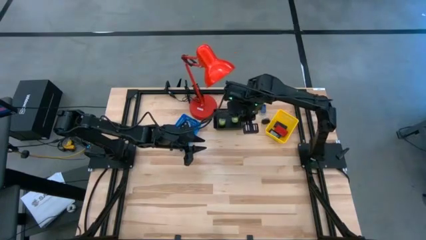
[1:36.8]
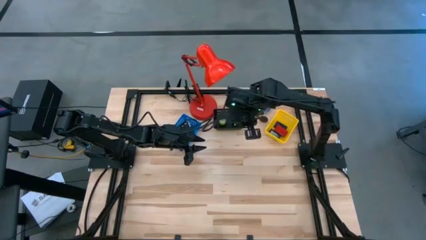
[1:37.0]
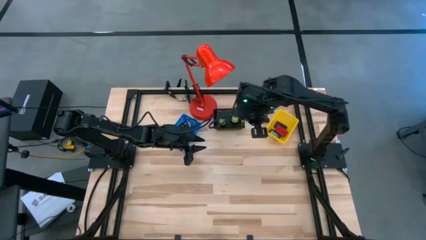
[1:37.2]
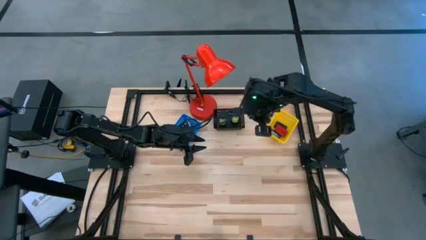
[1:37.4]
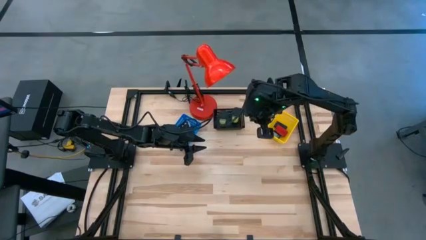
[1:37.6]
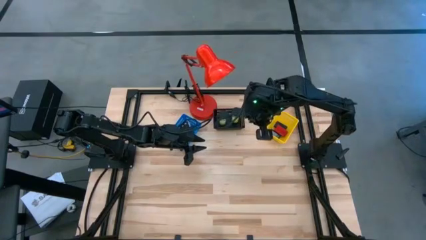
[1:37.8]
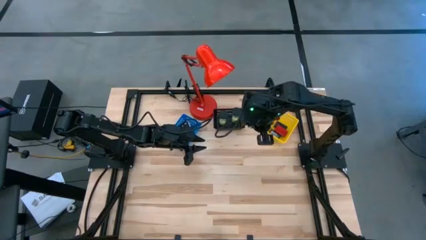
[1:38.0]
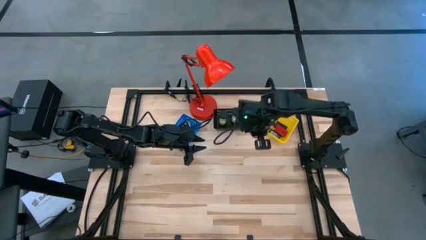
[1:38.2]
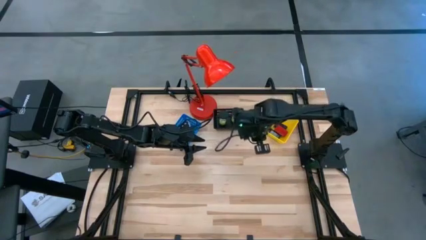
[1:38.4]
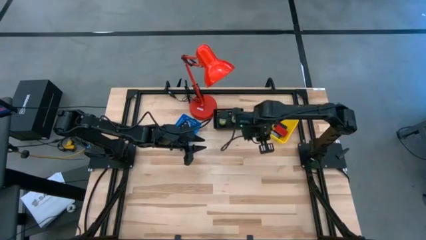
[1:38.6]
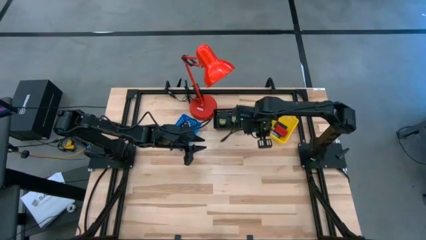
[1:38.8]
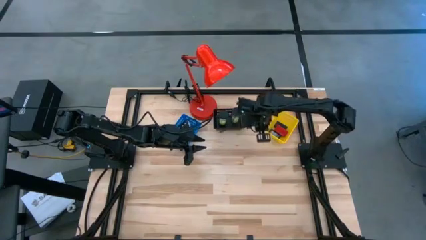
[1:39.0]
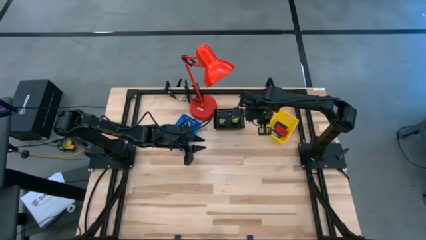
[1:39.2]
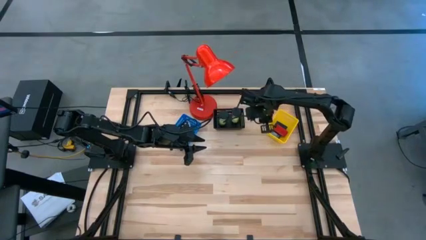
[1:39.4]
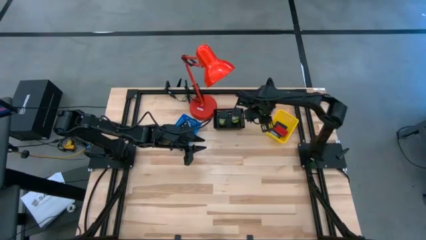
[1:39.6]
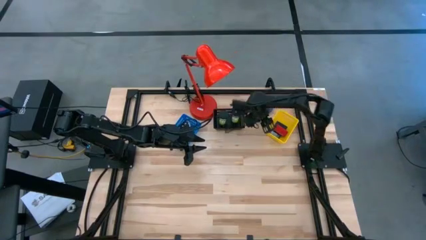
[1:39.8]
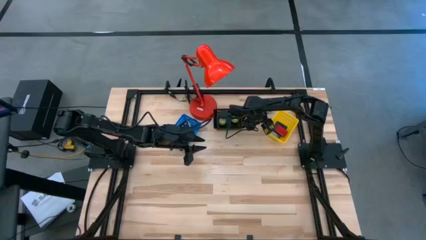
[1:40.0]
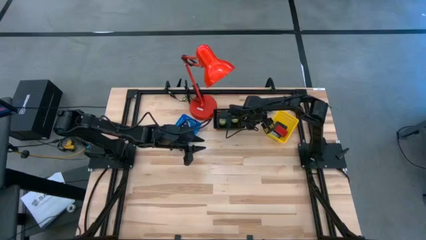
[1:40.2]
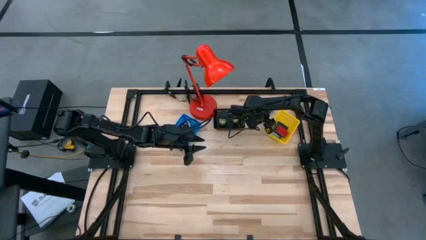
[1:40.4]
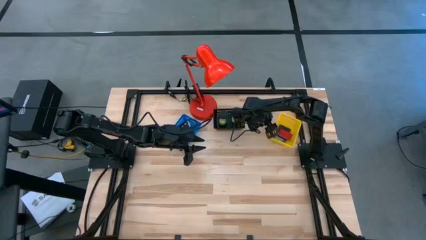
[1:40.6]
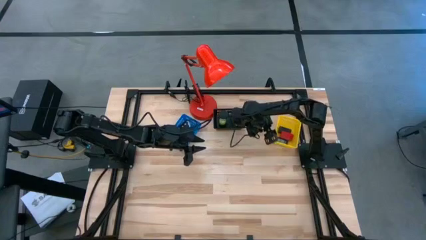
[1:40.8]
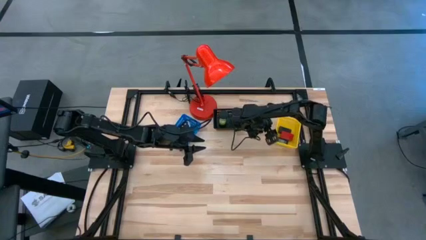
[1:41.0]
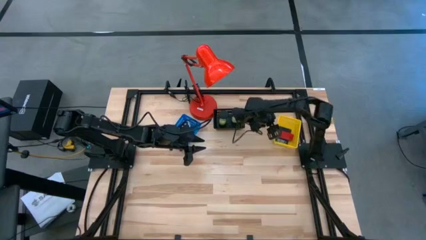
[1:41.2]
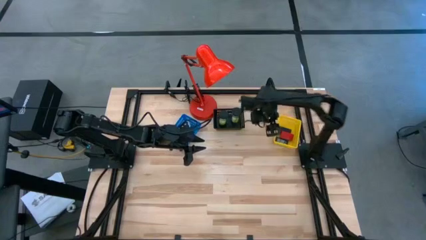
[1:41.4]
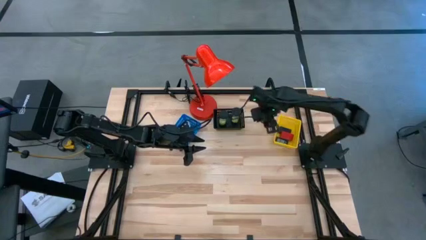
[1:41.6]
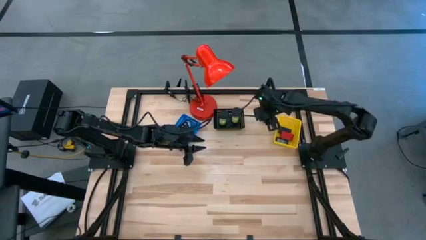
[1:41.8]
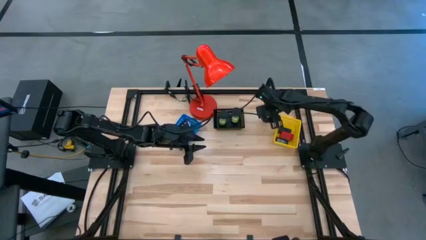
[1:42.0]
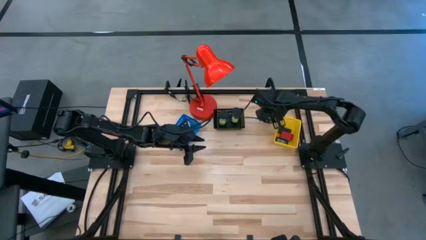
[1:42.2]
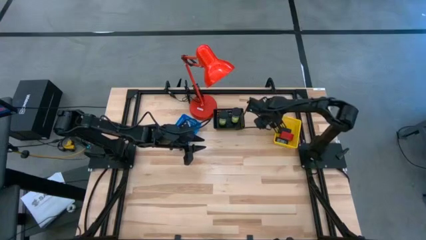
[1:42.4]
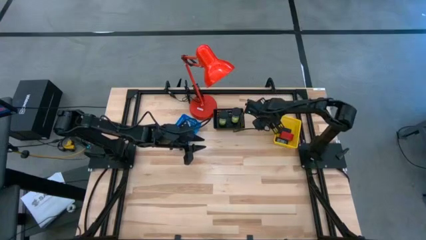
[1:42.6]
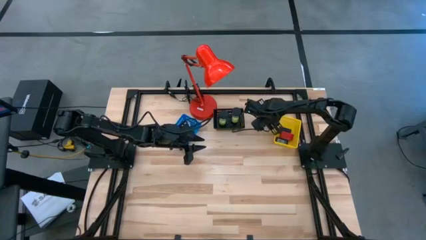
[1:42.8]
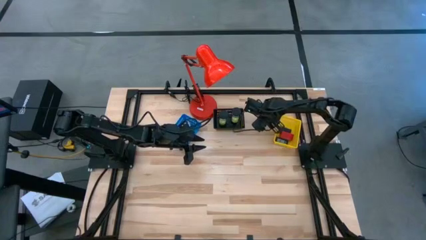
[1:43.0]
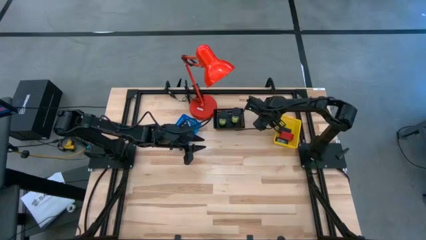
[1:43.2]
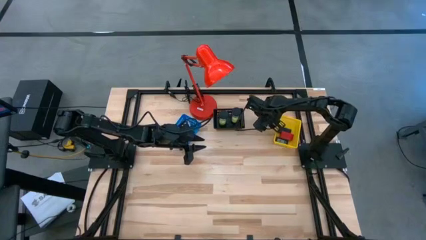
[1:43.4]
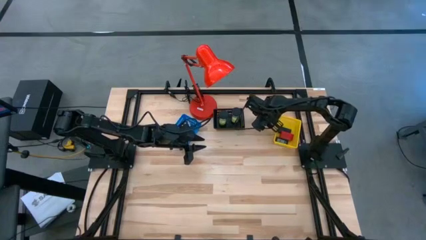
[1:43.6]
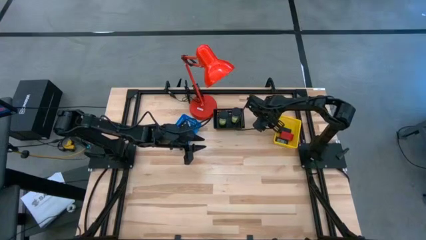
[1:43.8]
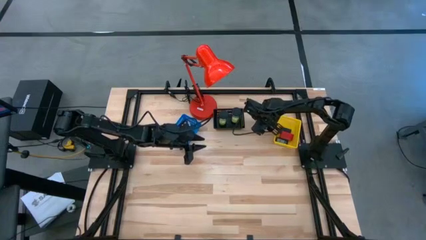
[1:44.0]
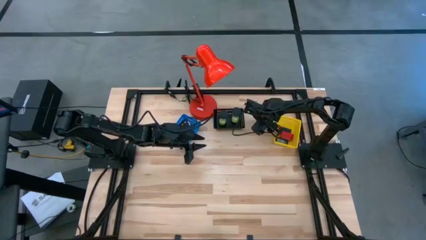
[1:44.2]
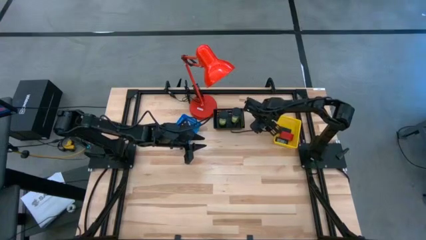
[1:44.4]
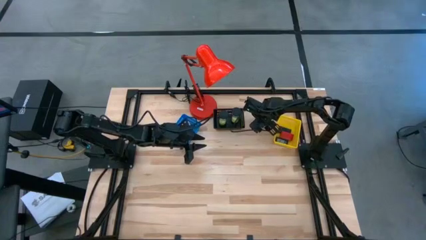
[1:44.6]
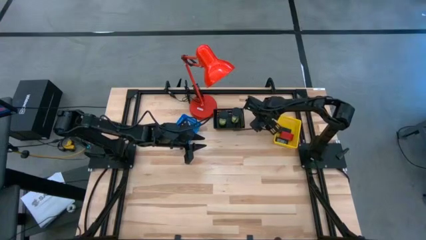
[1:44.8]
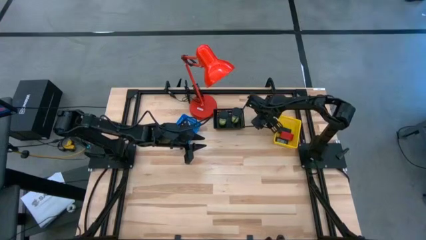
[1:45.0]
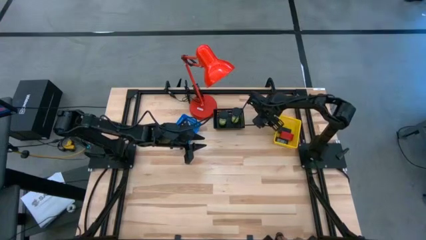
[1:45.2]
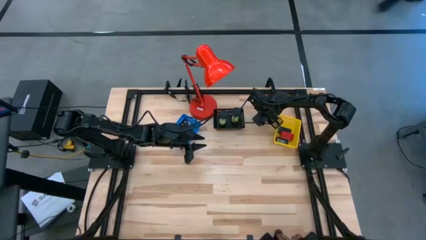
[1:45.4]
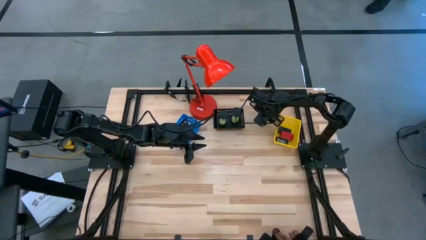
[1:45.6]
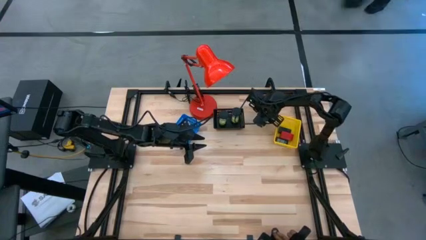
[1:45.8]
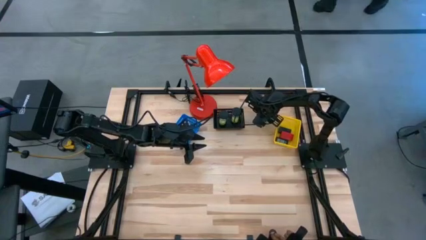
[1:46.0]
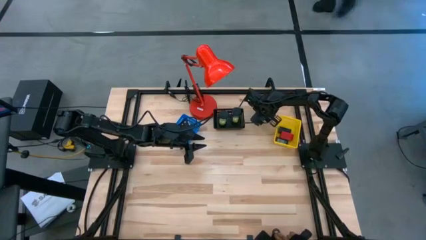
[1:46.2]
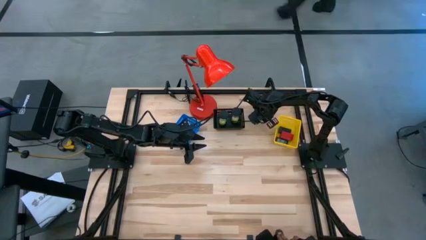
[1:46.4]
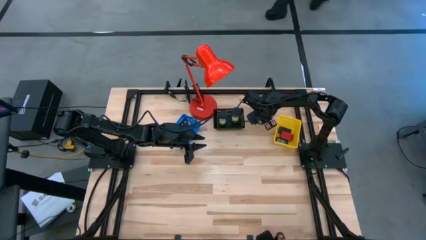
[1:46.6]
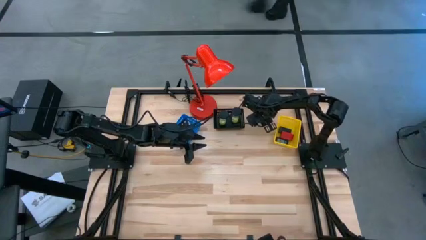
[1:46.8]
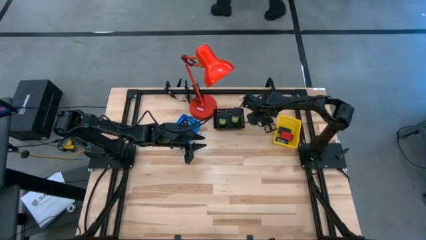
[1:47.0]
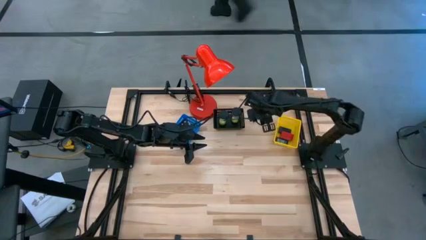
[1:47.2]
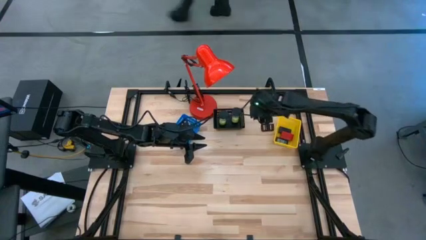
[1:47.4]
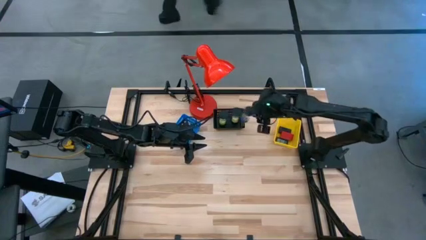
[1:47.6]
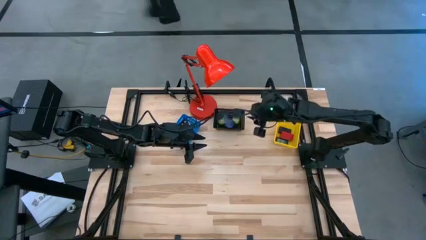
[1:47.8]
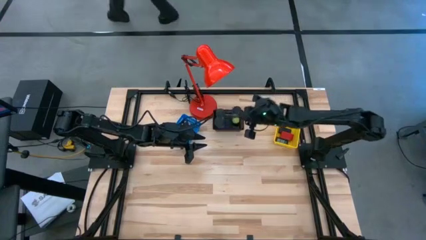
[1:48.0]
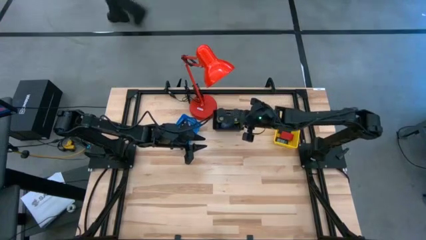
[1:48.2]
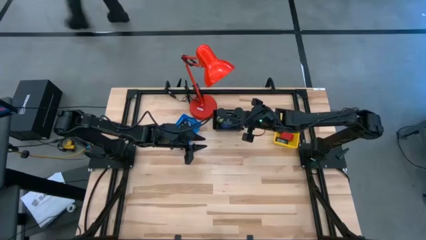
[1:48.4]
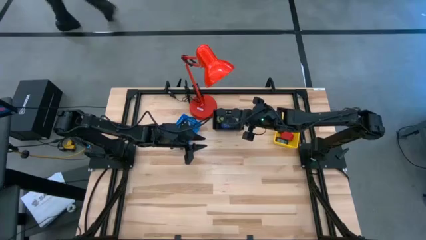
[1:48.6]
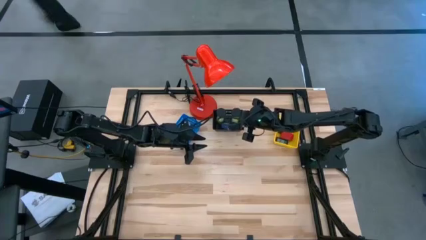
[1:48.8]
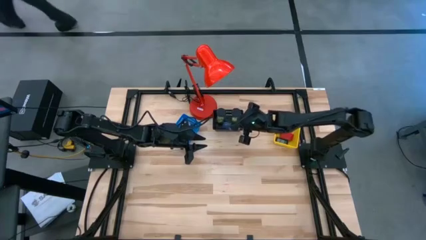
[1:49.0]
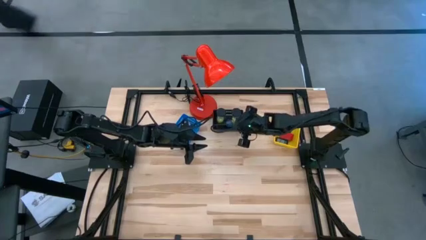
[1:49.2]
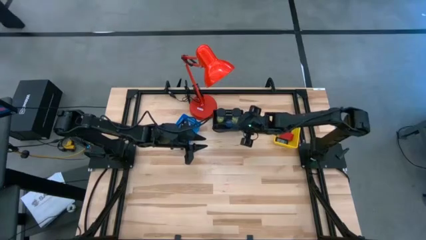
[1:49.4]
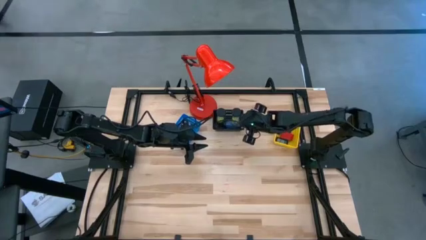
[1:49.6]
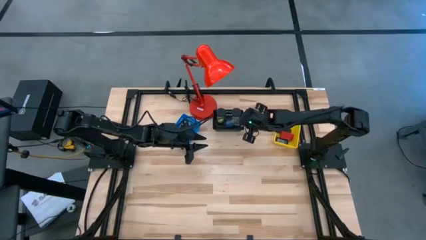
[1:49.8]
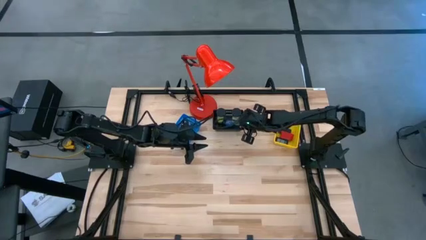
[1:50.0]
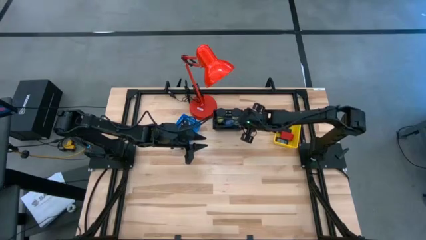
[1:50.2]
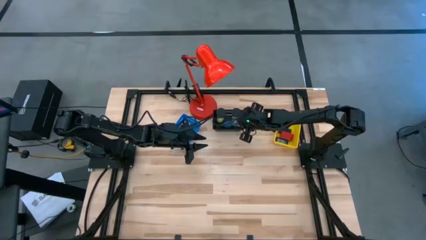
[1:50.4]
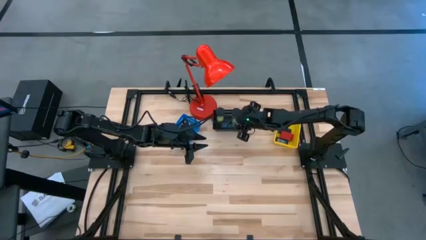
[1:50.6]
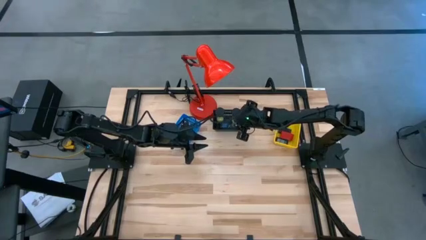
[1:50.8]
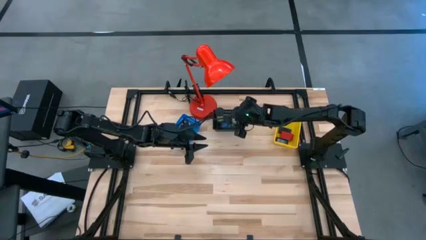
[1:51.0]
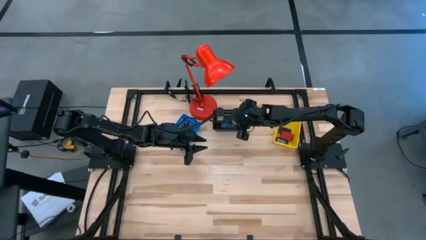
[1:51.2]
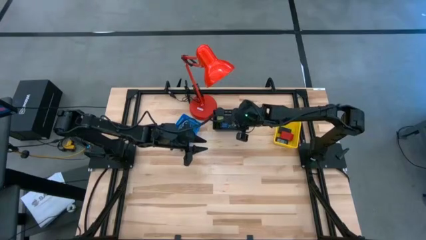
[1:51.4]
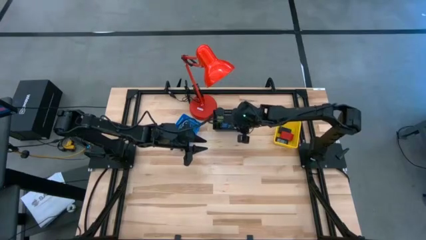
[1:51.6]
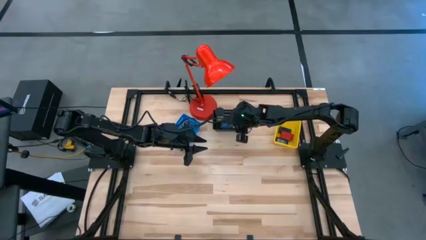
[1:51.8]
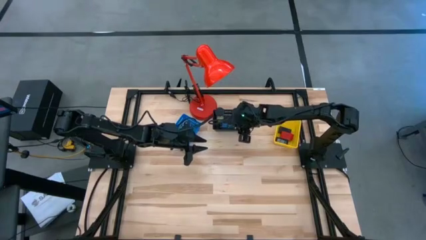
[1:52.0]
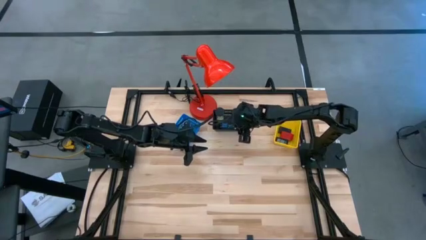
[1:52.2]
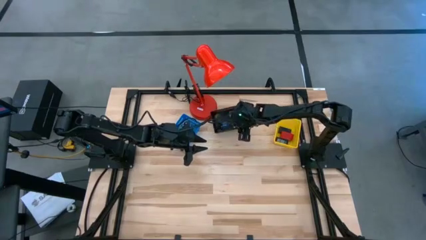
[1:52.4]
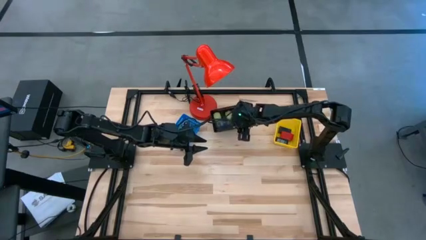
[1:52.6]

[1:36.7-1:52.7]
Task: Pick & Place Office items
Put the blue hourglass into the black bin

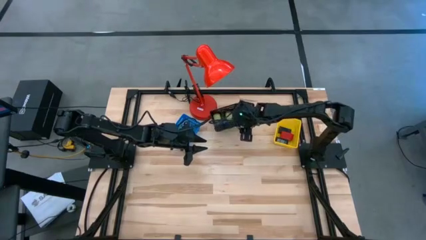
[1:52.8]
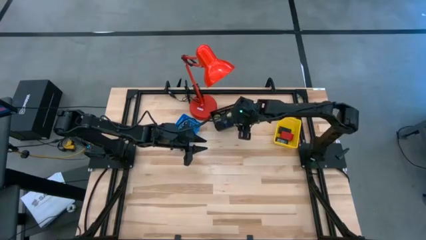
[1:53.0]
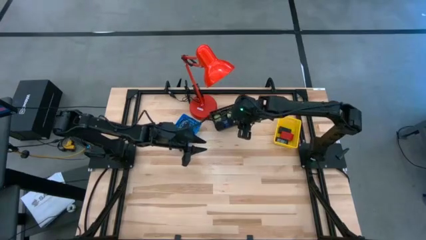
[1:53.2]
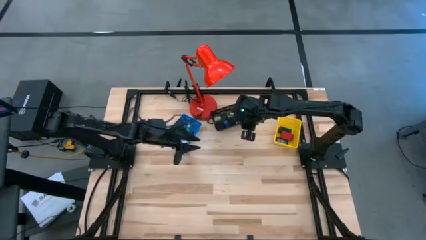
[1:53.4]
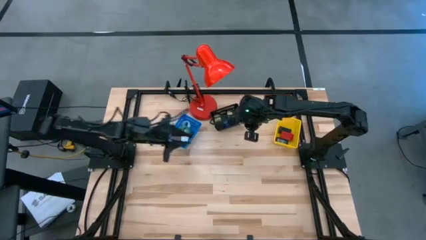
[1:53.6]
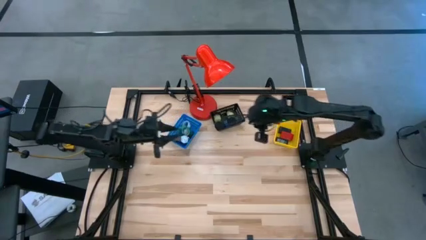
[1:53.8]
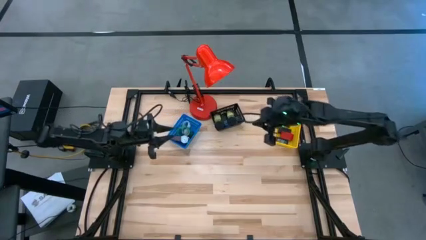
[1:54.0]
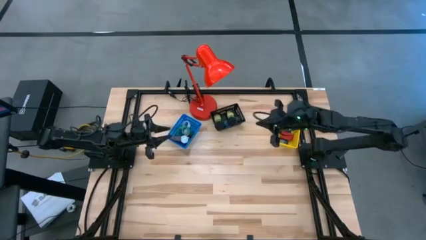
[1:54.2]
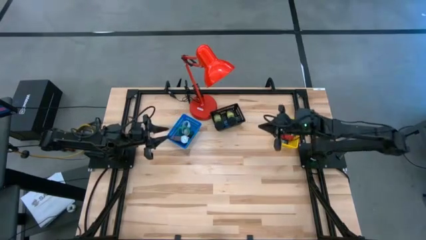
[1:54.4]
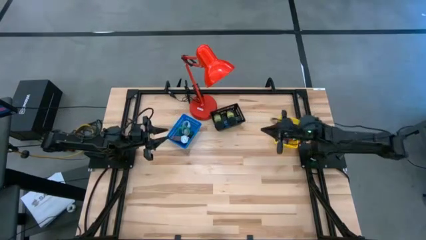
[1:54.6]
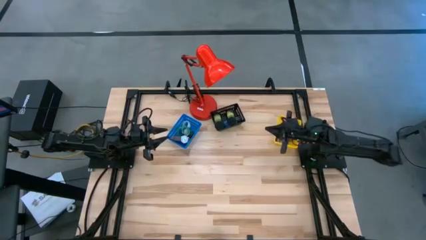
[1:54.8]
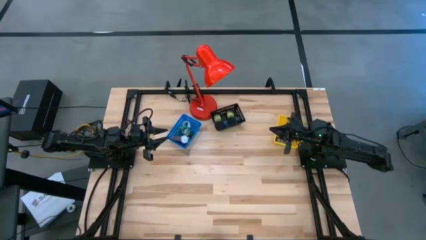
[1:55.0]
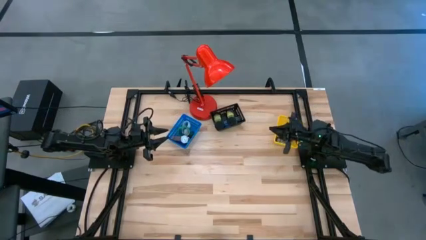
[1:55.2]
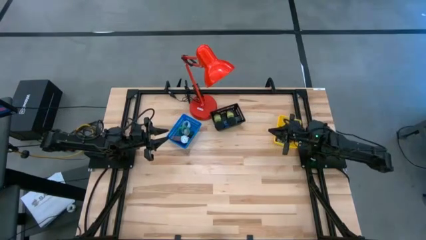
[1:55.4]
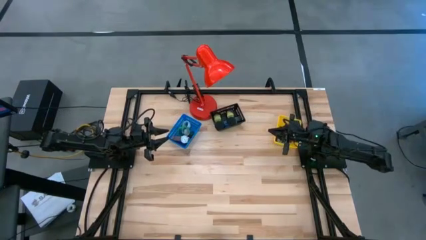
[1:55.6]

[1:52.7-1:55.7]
Return to Home Position
